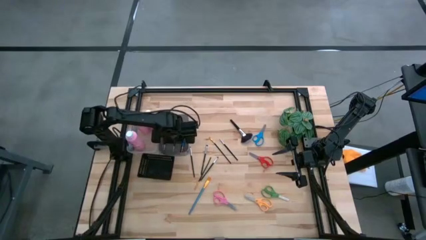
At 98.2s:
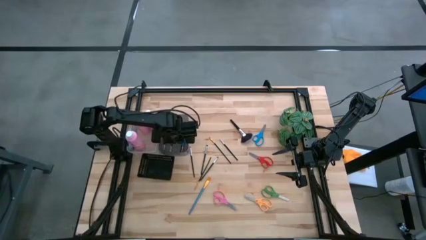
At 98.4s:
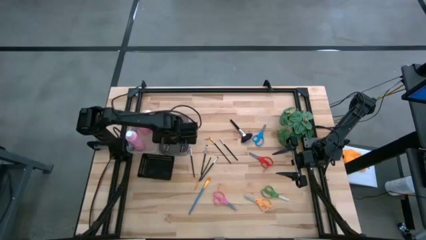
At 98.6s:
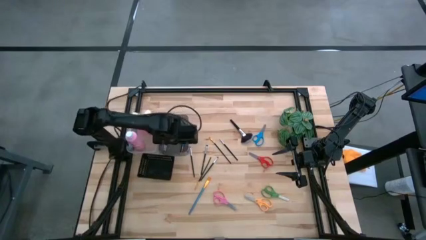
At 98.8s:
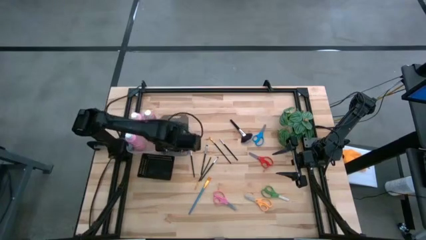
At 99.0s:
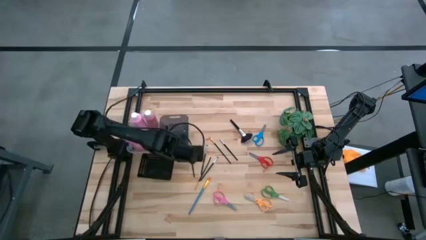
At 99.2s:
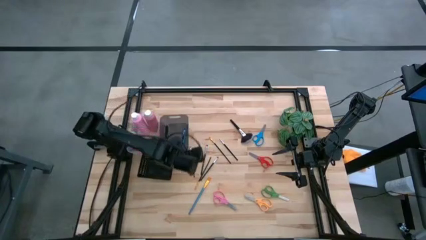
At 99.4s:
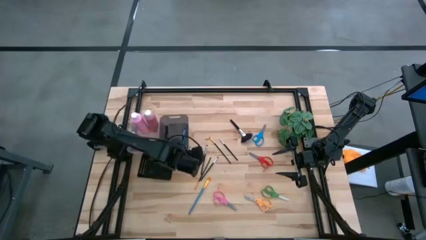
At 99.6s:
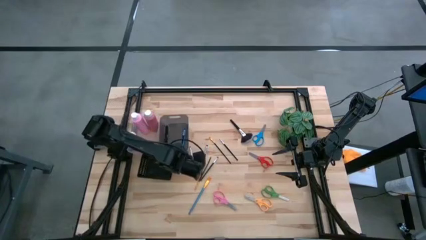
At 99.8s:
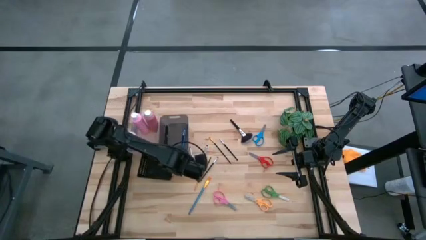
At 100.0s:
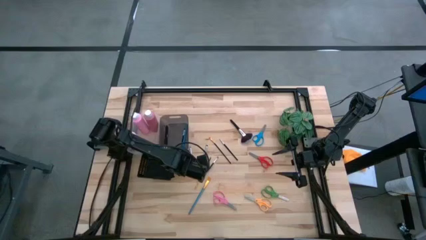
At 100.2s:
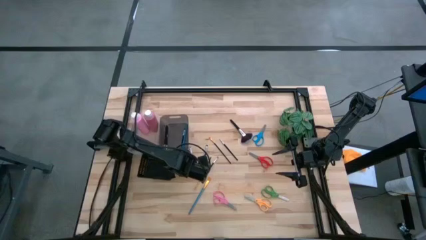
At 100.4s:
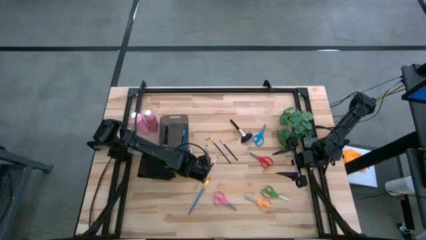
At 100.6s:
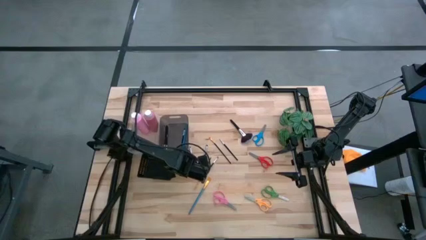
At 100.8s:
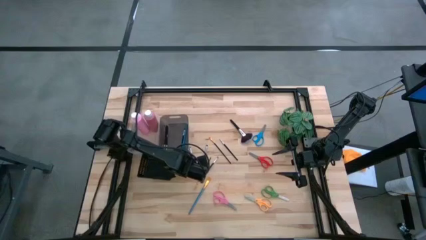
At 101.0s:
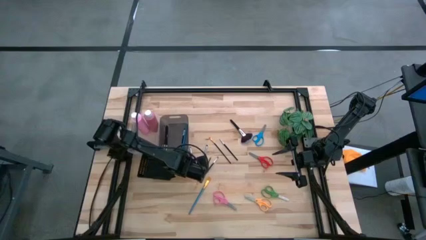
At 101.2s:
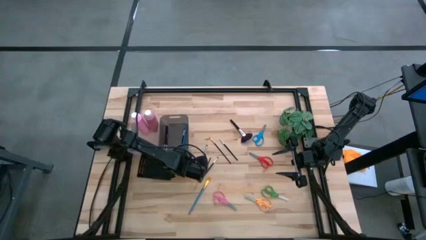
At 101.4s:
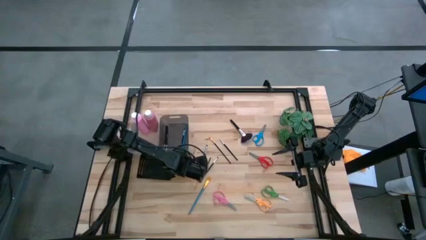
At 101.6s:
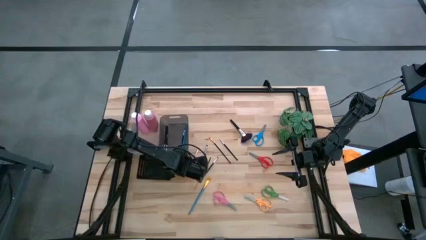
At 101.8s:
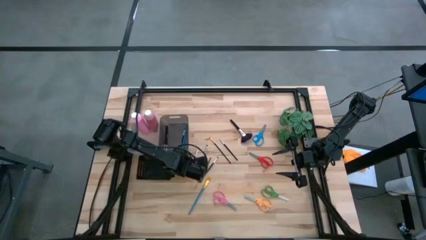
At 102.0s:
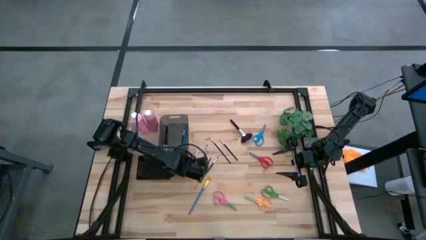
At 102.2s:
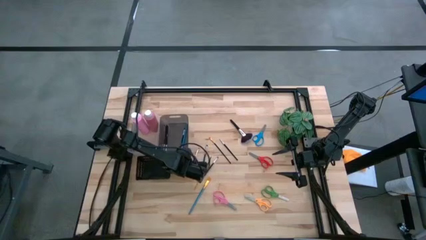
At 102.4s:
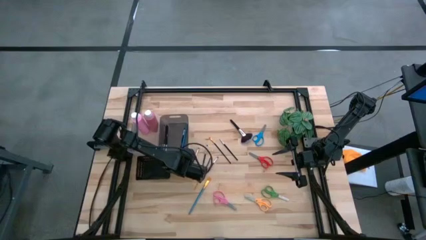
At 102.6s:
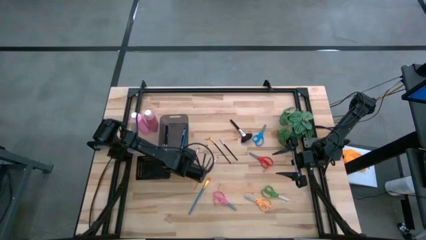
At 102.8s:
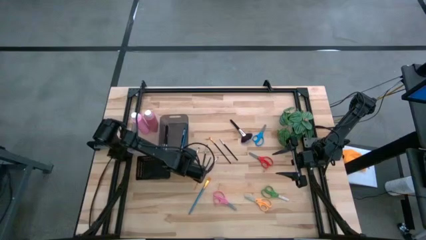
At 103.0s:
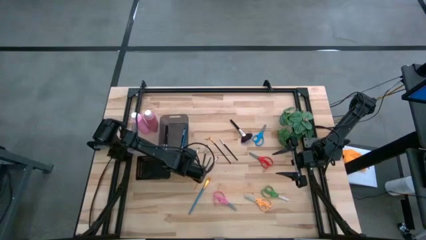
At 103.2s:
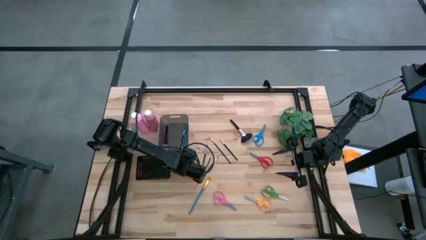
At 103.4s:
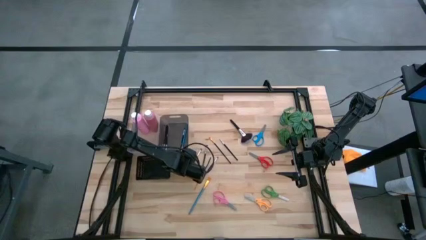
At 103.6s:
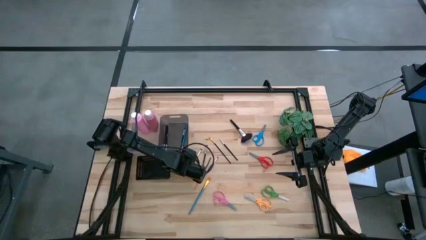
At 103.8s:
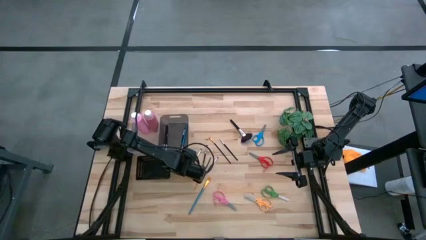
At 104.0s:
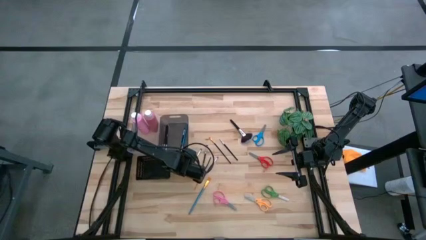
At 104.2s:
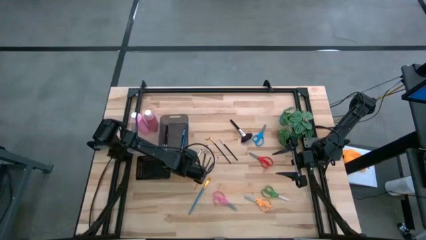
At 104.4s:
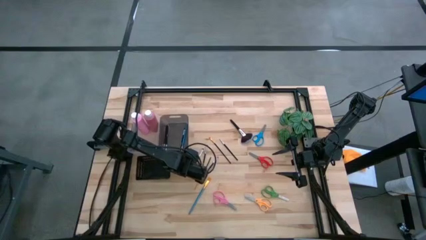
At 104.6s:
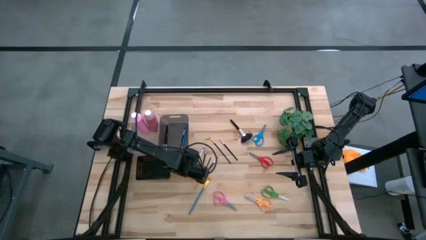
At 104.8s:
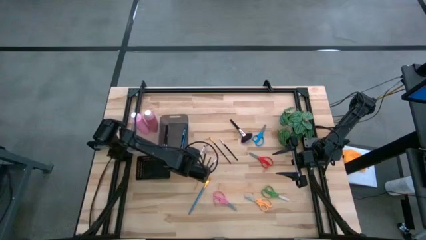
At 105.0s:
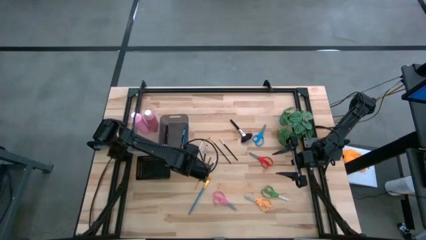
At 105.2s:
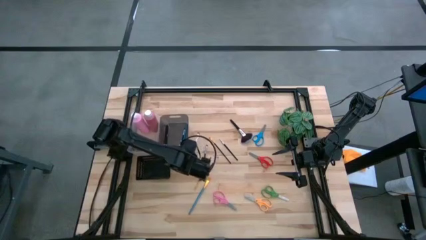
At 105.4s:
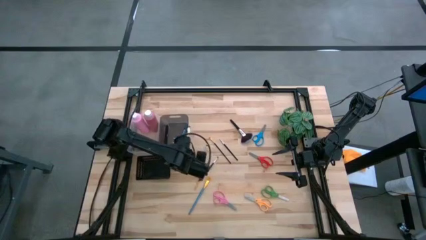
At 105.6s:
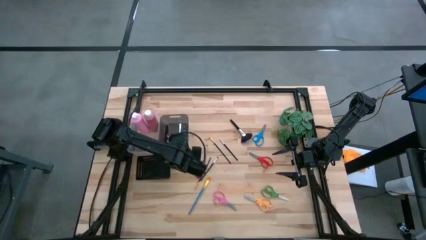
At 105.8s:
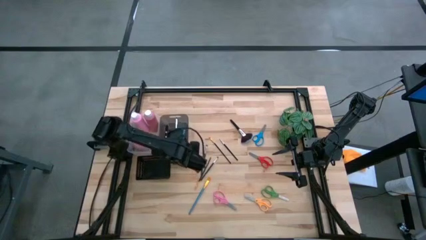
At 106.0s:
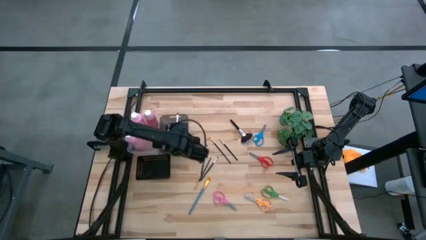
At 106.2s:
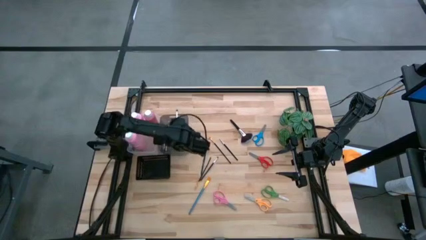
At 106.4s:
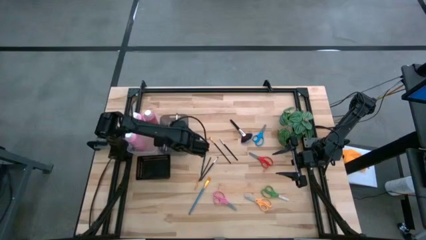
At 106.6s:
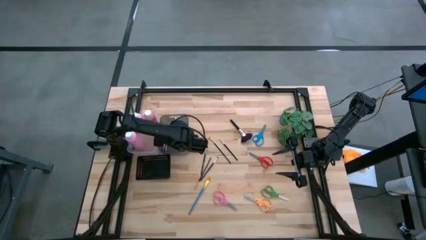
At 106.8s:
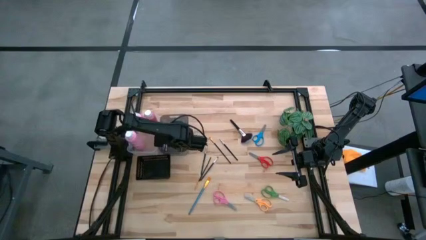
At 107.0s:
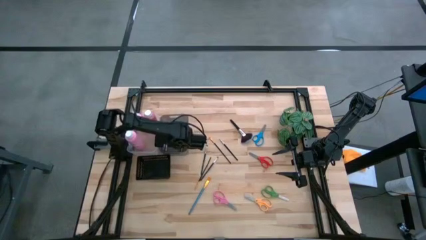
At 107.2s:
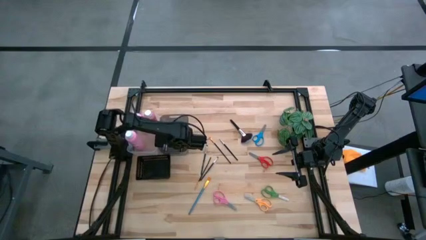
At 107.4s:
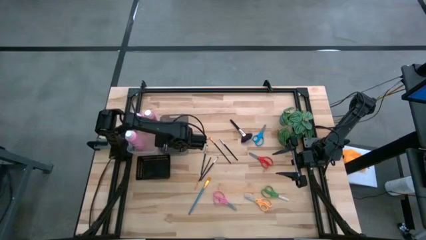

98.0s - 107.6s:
Task: Pick & Place Paint Supplies
Put the black brush into the black bin
